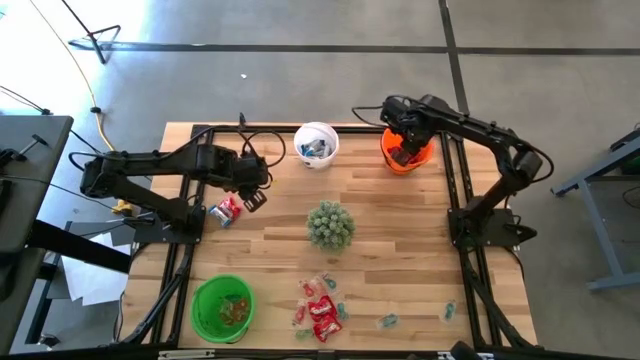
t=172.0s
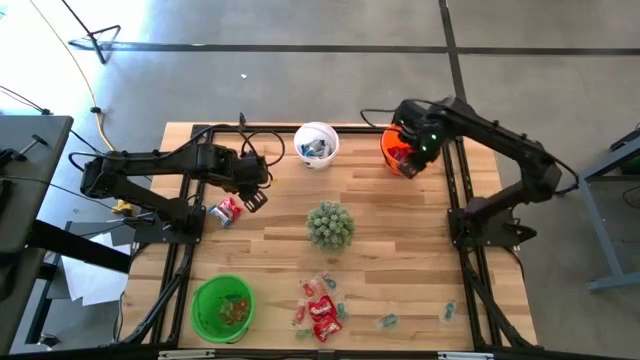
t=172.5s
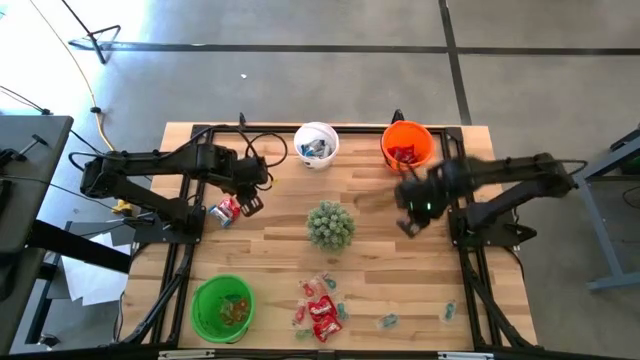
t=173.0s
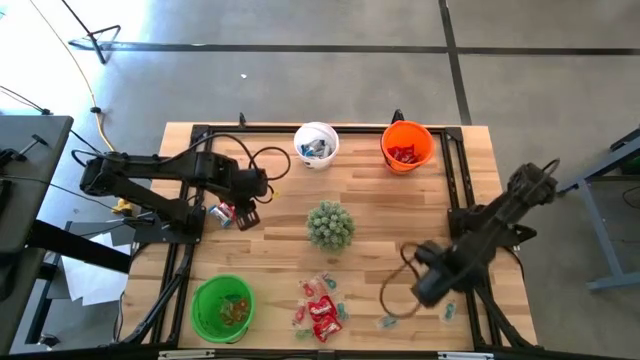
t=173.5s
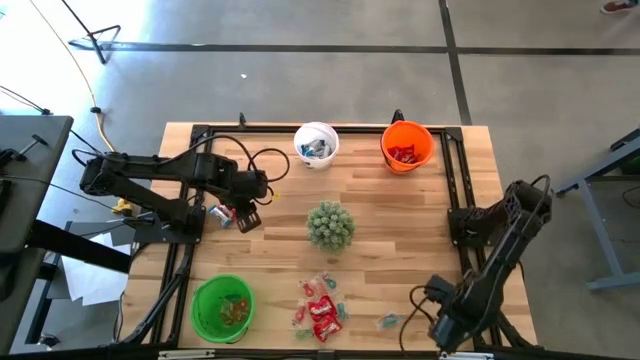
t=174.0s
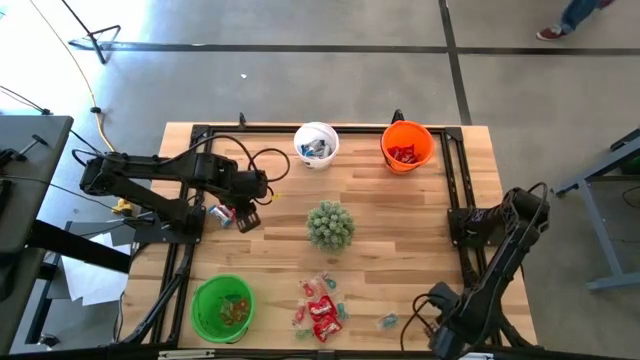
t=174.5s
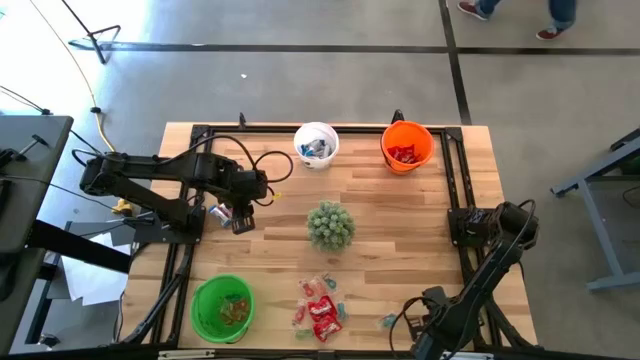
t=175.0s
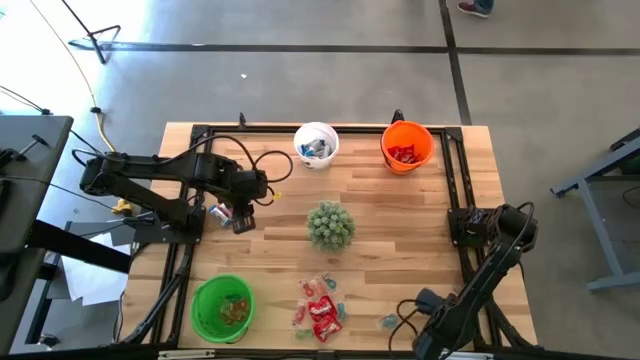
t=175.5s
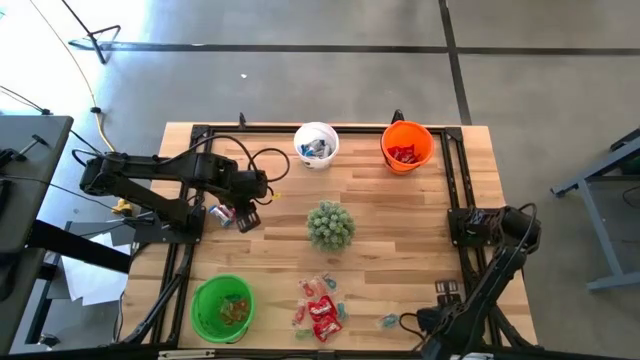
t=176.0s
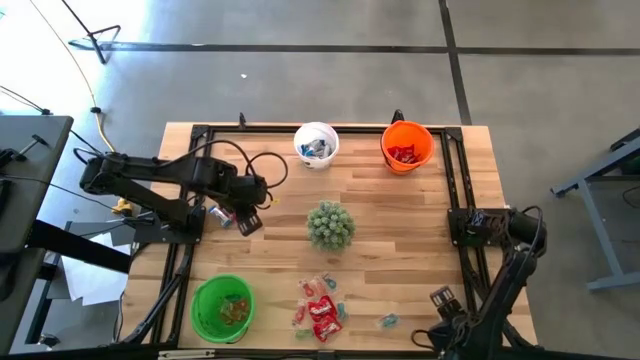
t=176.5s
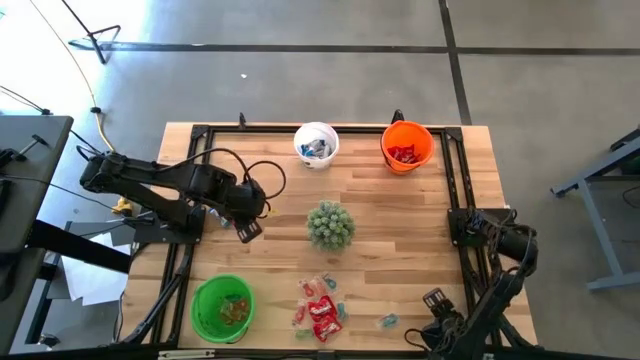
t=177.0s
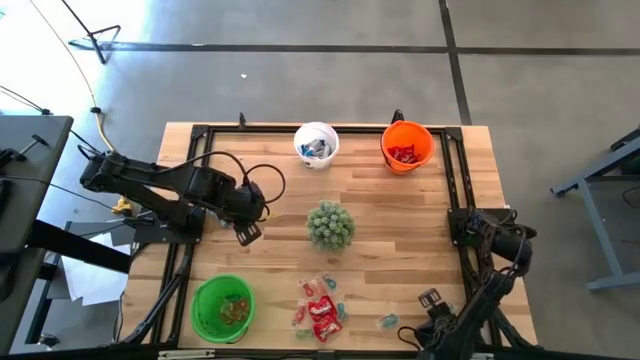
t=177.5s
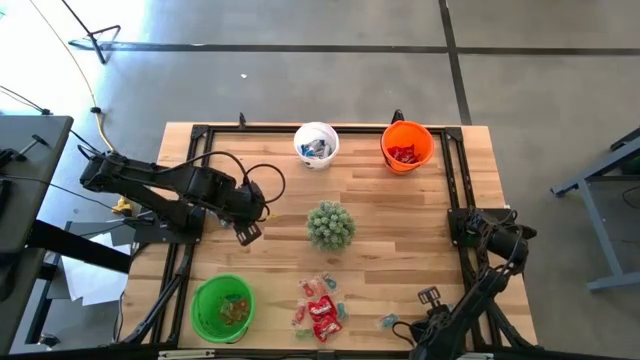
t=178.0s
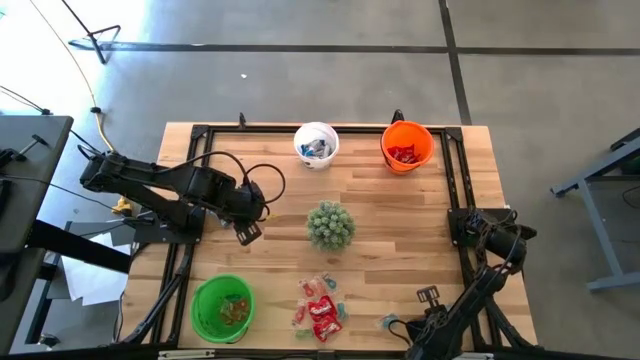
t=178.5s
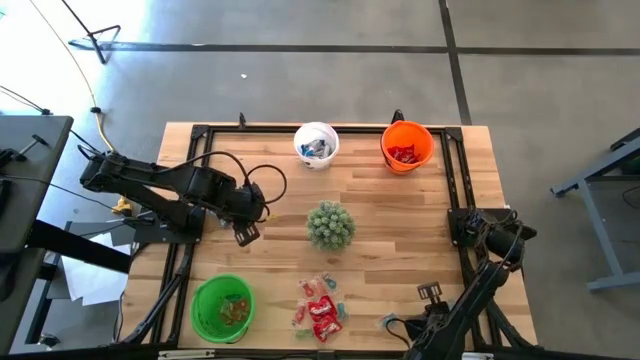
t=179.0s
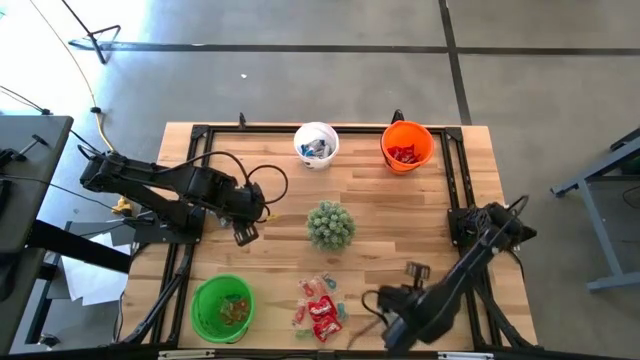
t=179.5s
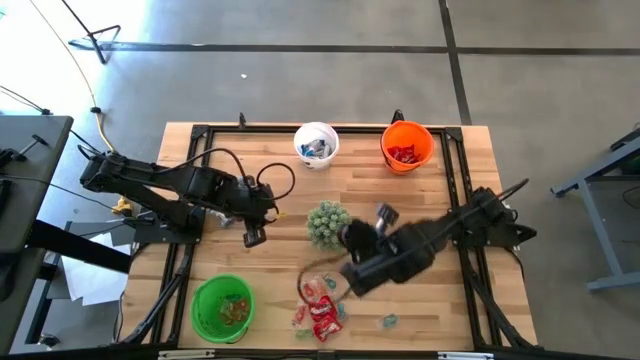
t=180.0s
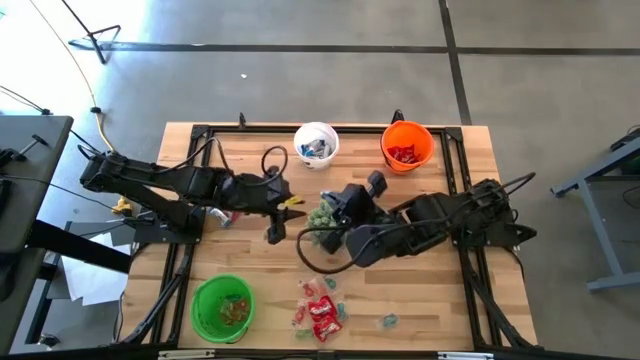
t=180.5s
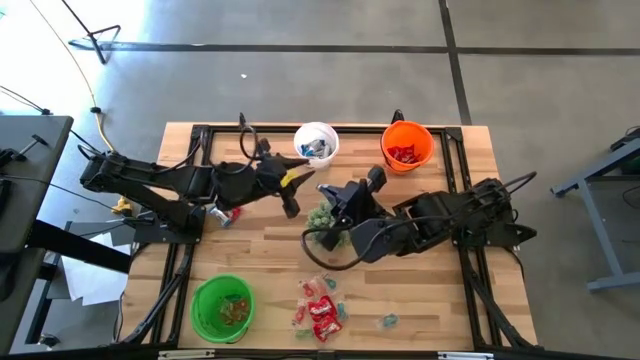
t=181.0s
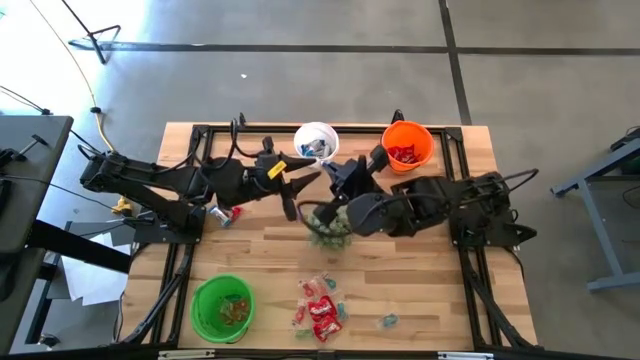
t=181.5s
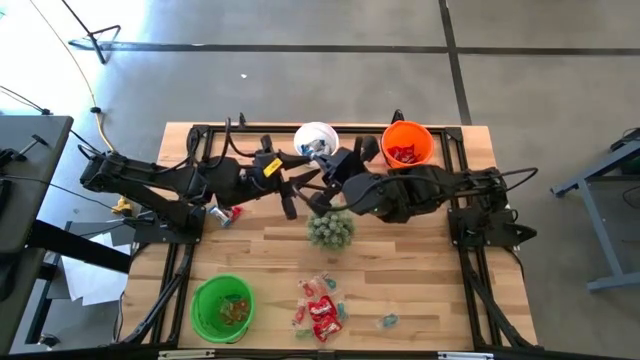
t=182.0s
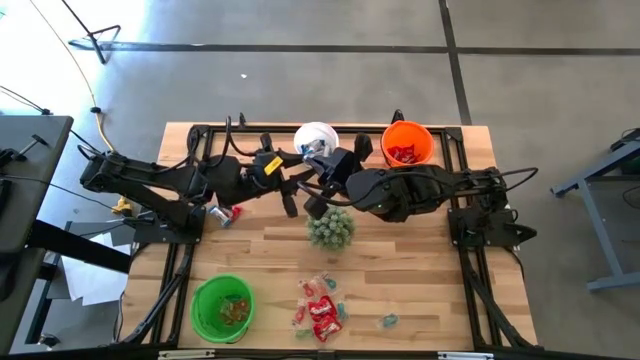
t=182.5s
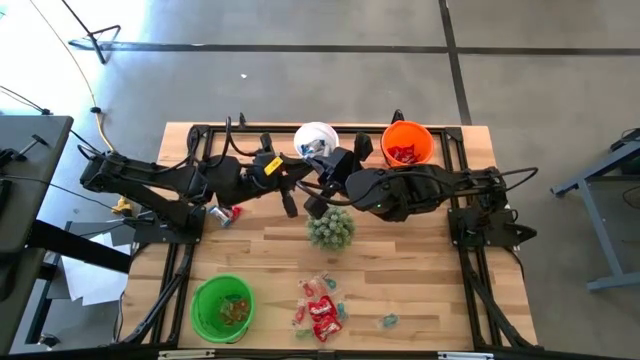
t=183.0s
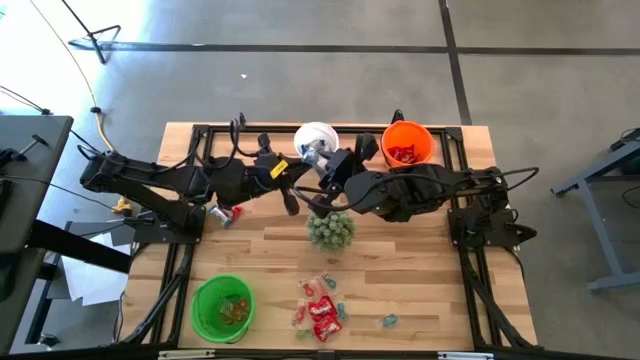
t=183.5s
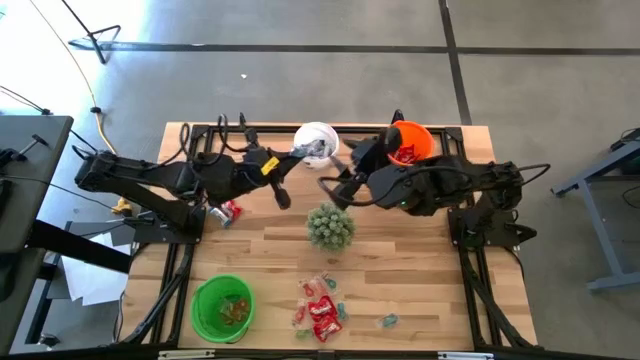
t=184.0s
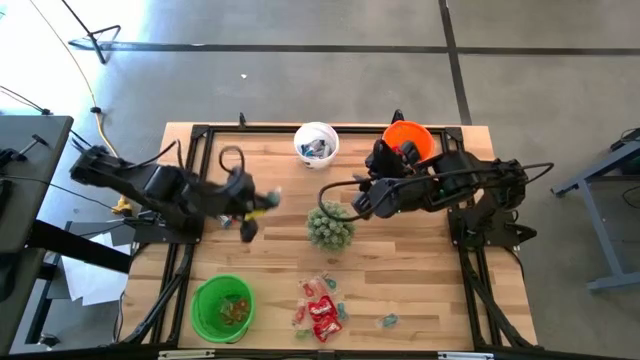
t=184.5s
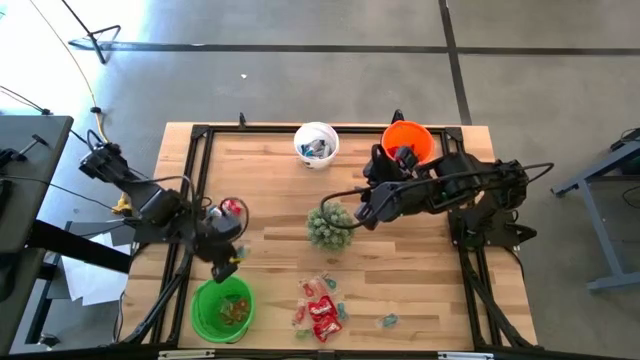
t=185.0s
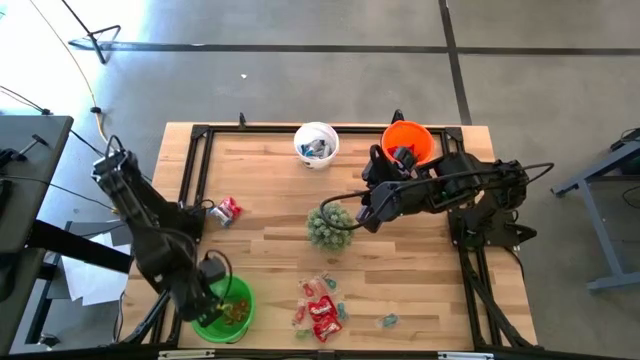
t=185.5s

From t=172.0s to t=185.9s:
Task: Sort candy
Put the blue gummy into the green bucket

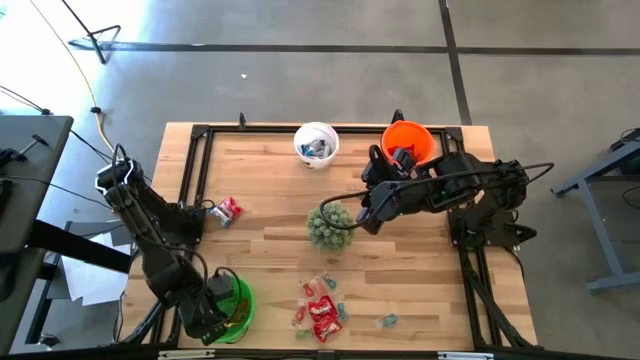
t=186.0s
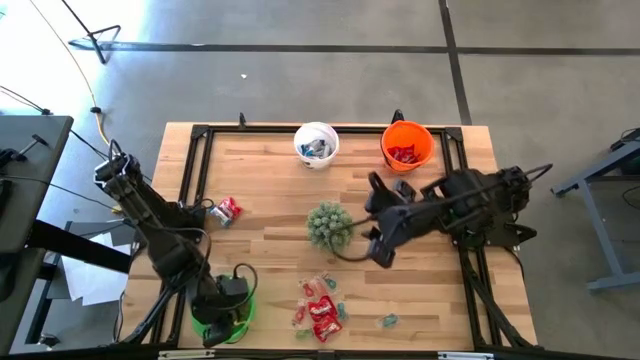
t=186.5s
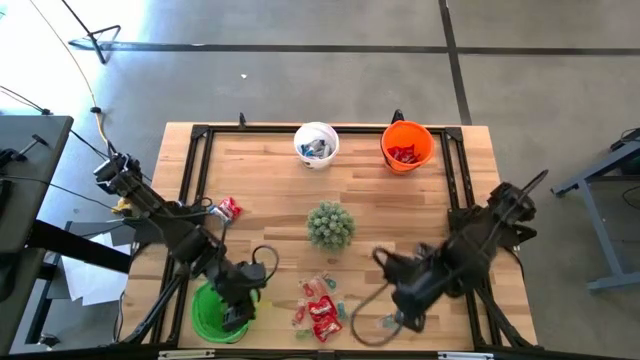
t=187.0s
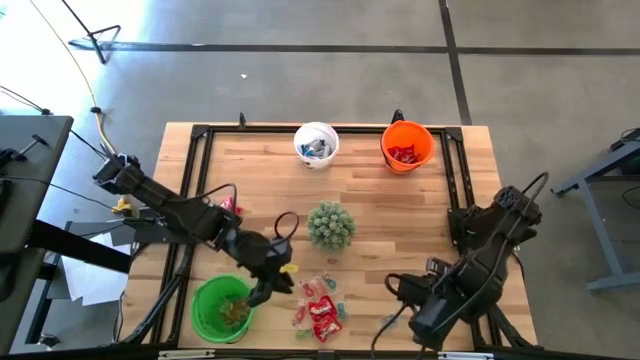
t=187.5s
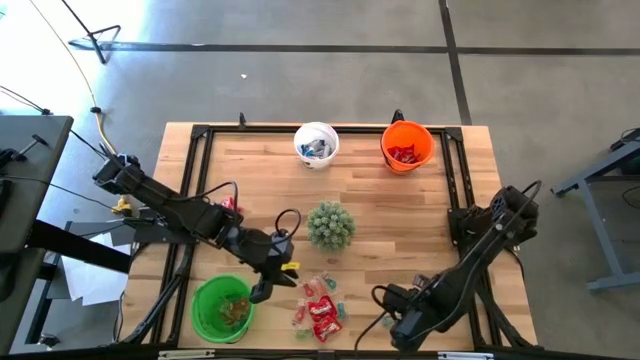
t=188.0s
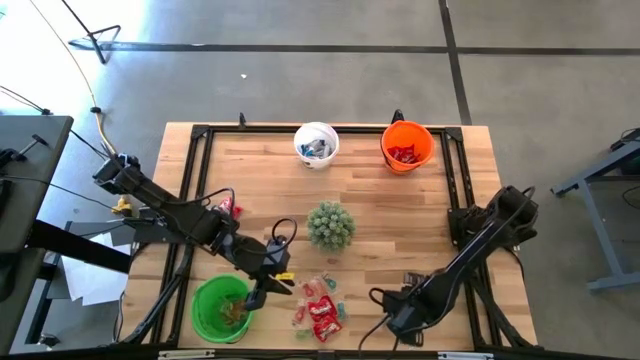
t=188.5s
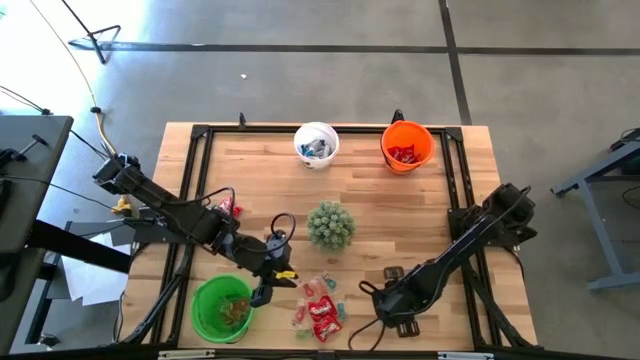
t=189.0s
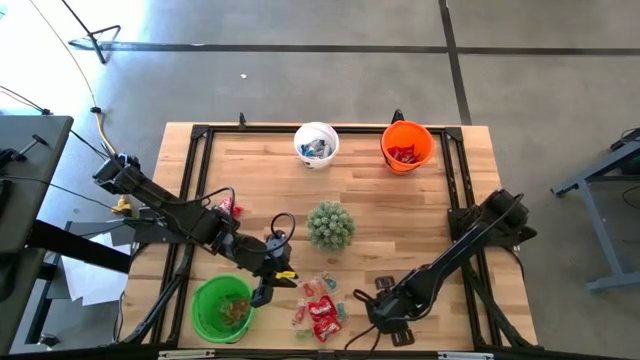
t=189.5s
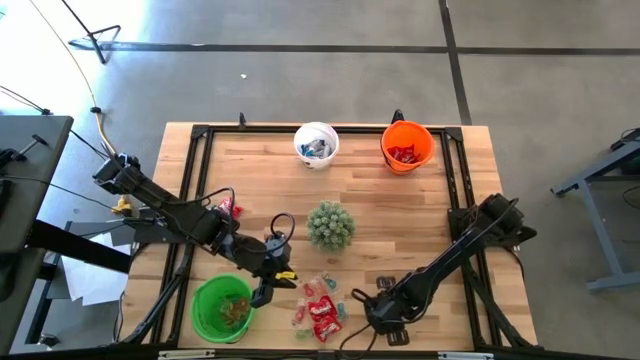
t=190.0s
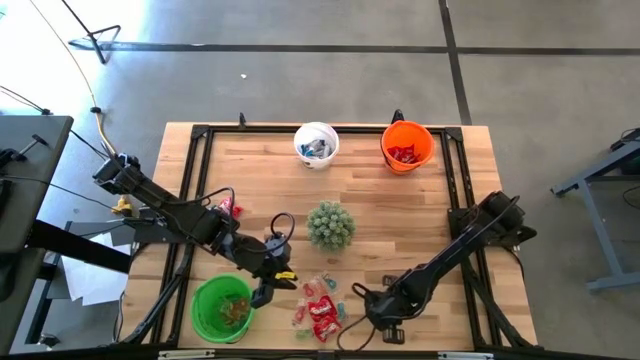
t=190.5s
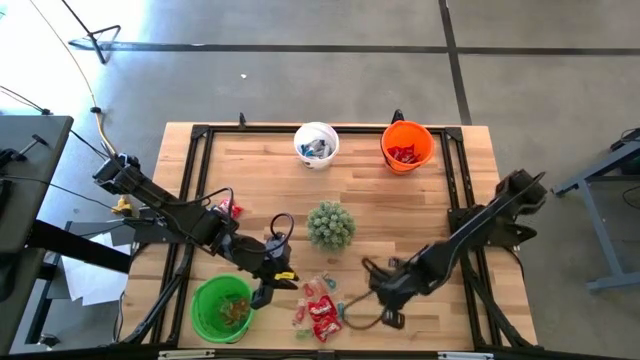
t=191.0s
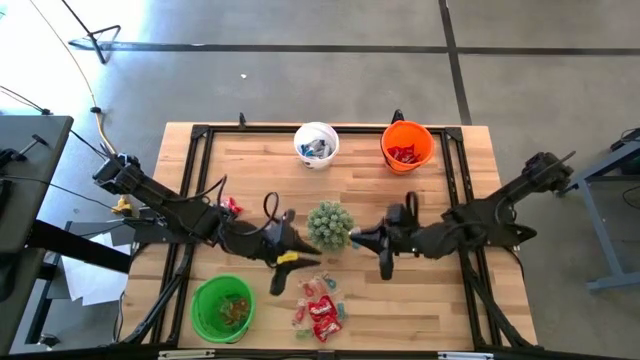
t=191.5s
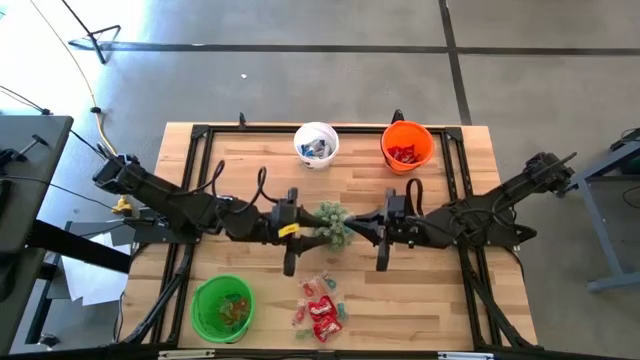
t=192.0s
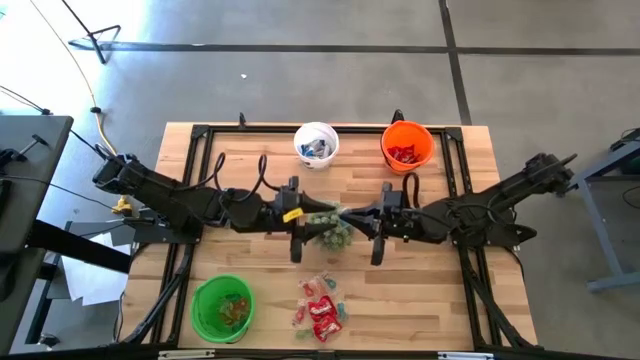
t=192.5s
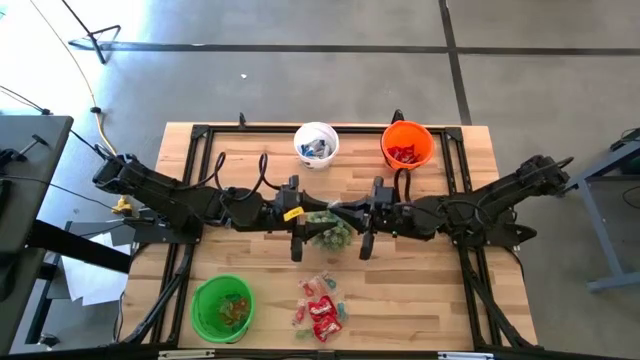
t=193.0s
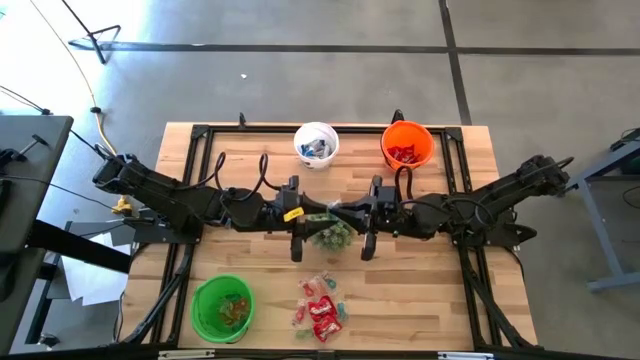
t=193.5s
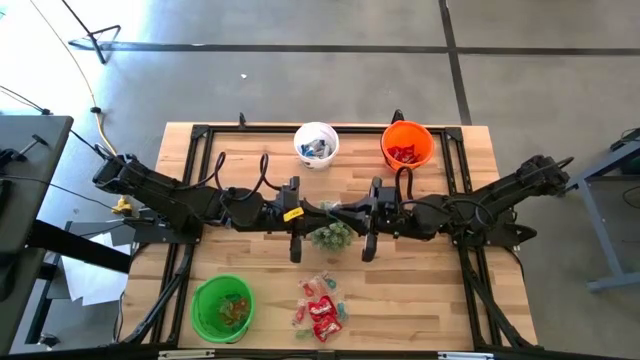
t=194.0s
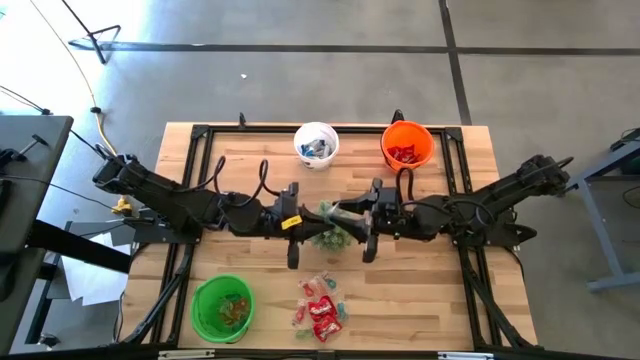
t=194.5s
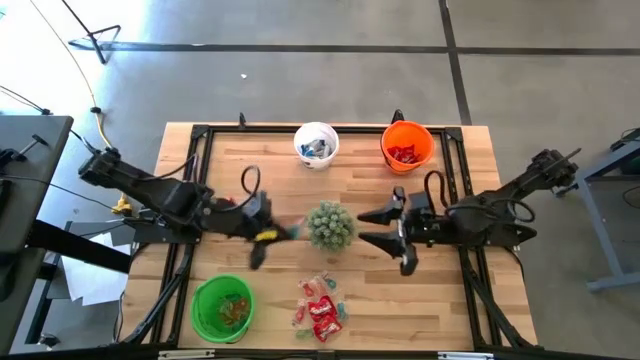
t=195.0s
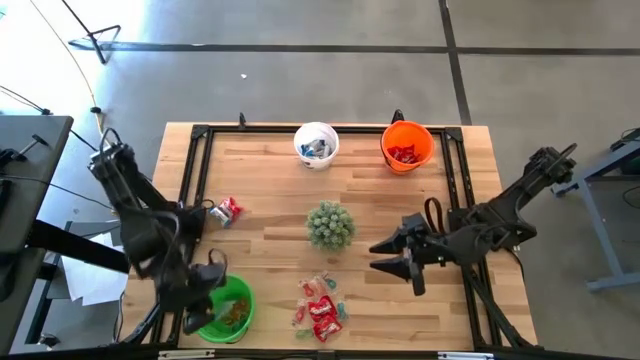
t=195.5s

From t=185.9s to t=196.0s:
Put the blue gummy into the green bucket
